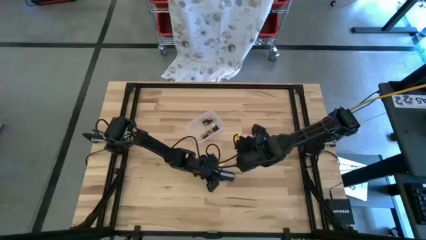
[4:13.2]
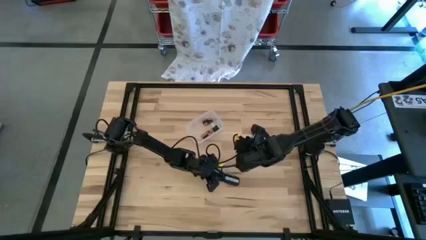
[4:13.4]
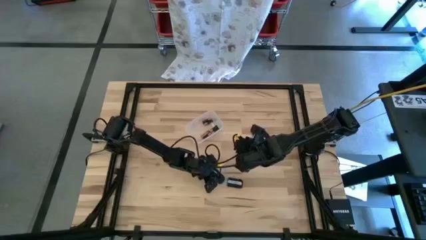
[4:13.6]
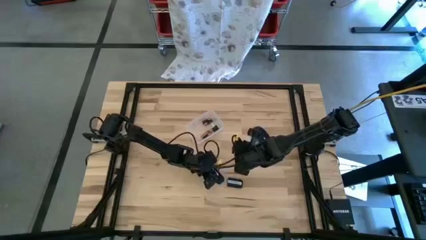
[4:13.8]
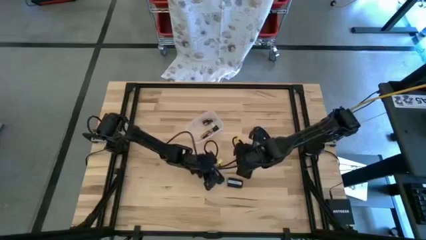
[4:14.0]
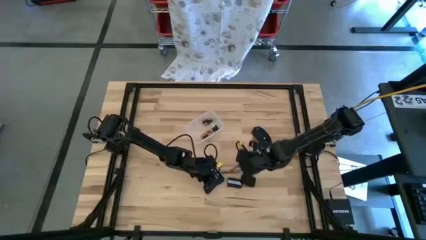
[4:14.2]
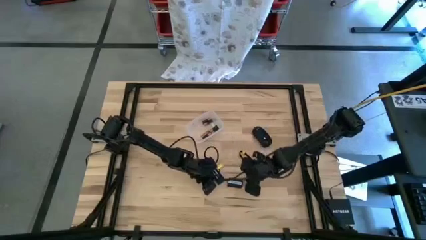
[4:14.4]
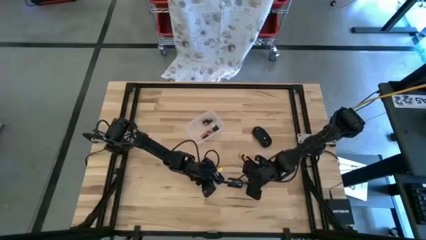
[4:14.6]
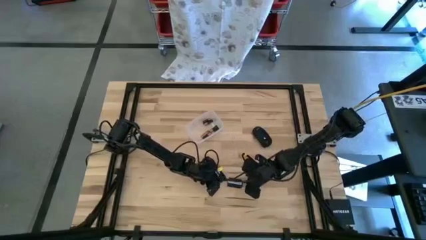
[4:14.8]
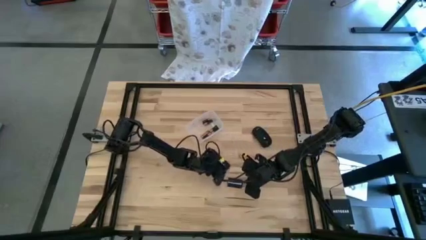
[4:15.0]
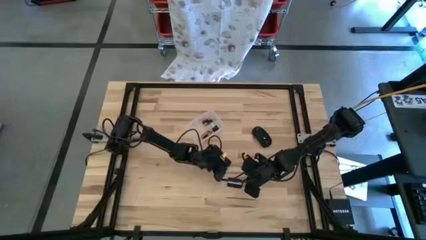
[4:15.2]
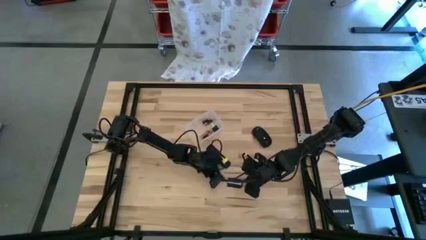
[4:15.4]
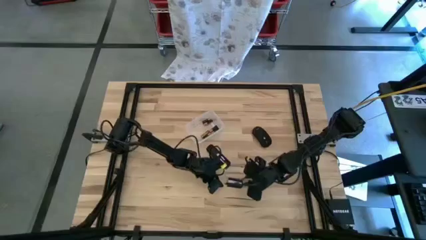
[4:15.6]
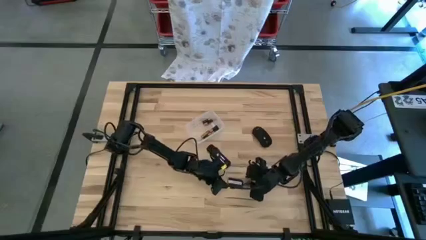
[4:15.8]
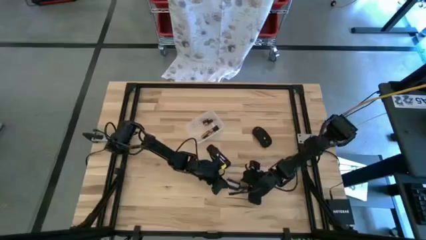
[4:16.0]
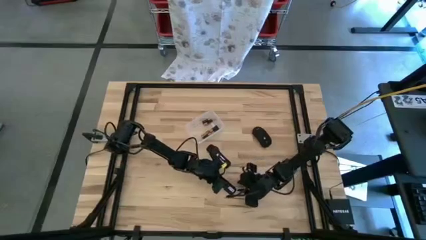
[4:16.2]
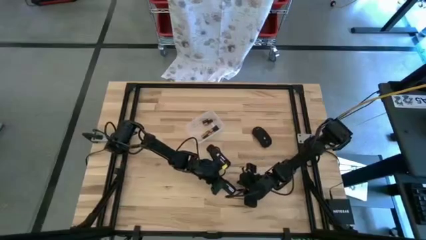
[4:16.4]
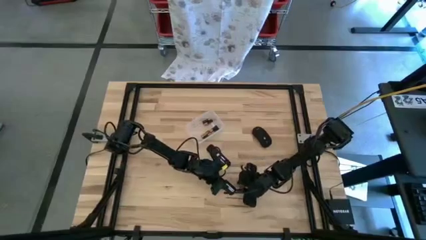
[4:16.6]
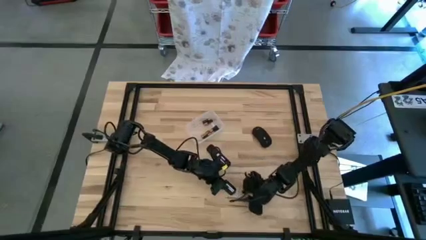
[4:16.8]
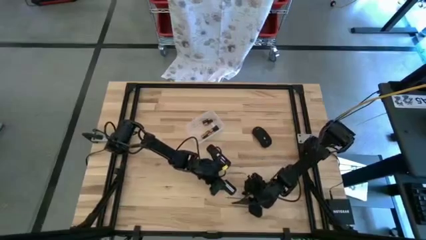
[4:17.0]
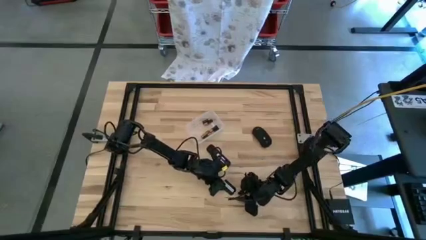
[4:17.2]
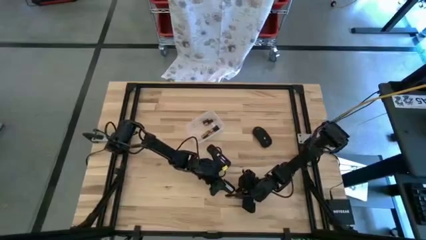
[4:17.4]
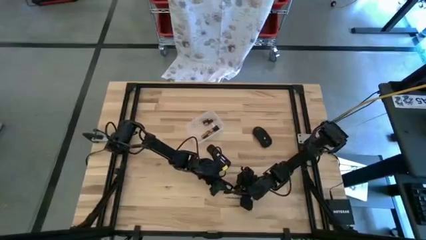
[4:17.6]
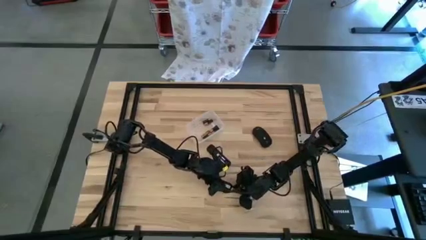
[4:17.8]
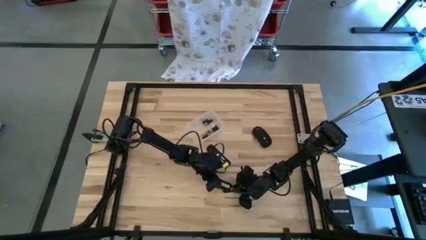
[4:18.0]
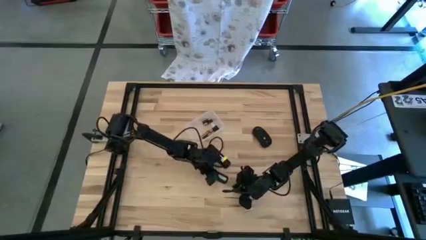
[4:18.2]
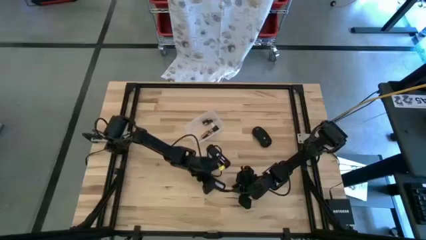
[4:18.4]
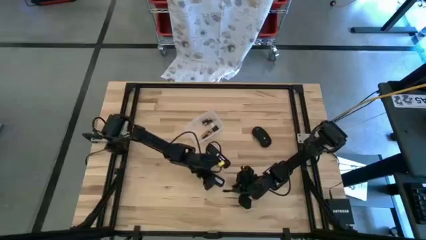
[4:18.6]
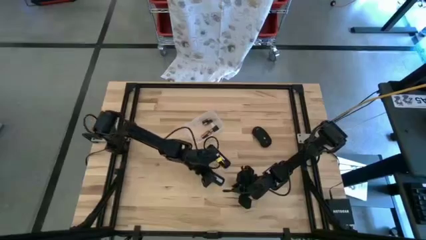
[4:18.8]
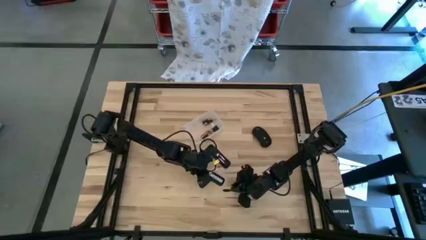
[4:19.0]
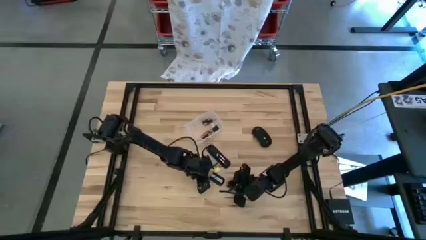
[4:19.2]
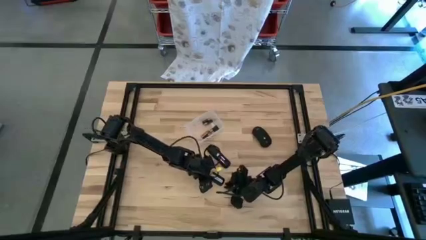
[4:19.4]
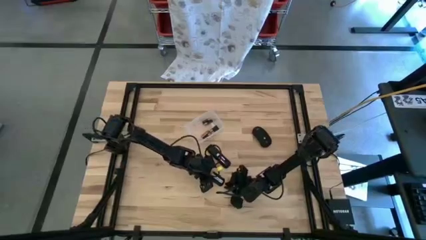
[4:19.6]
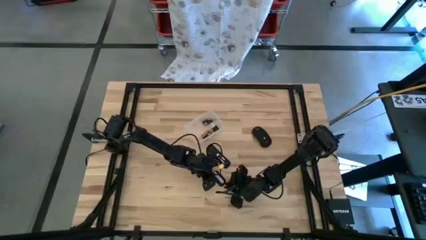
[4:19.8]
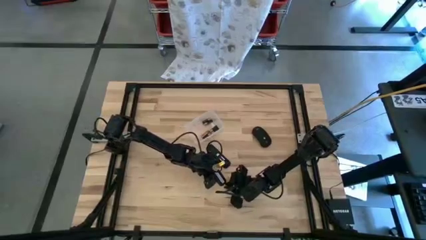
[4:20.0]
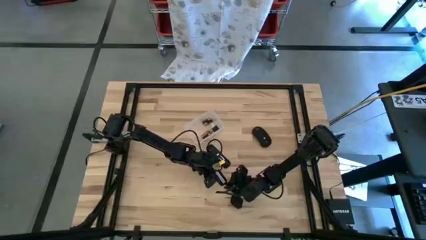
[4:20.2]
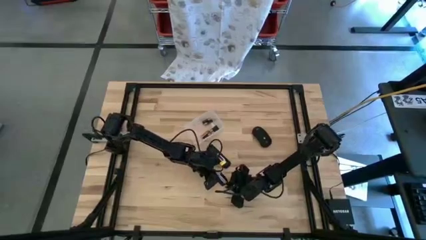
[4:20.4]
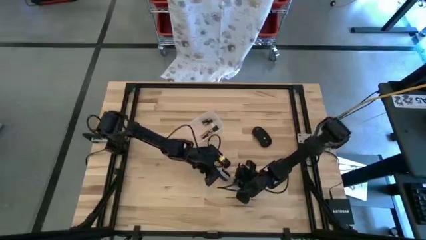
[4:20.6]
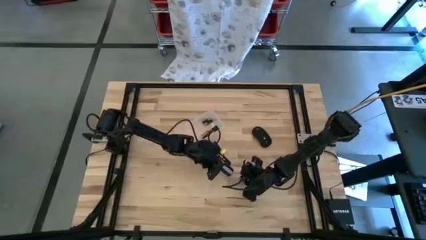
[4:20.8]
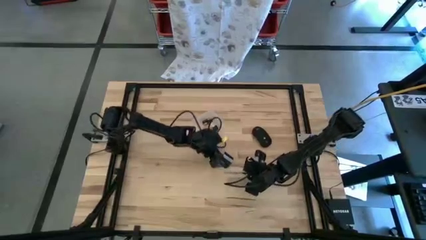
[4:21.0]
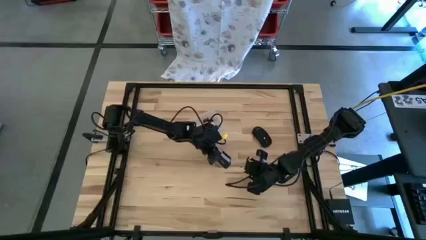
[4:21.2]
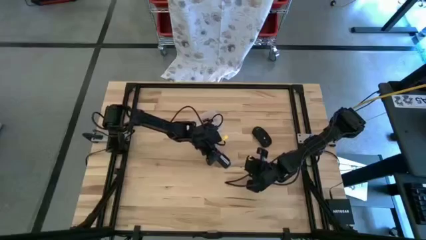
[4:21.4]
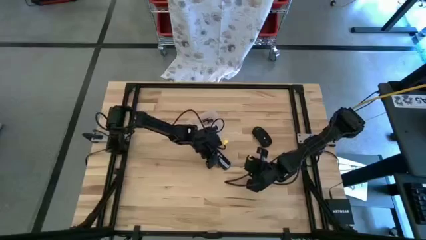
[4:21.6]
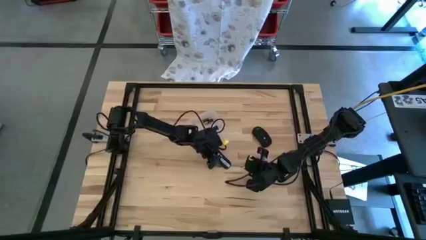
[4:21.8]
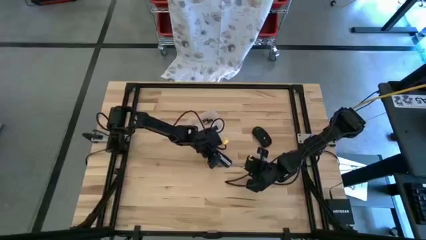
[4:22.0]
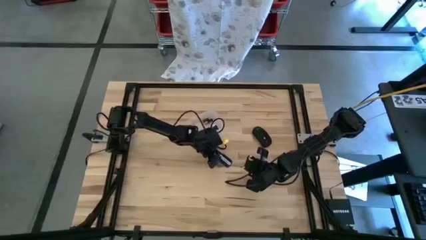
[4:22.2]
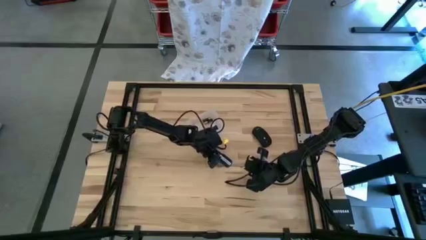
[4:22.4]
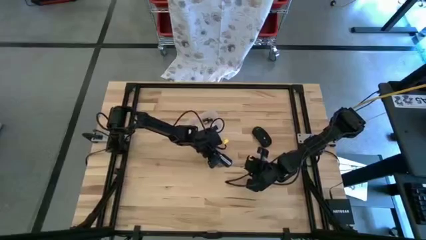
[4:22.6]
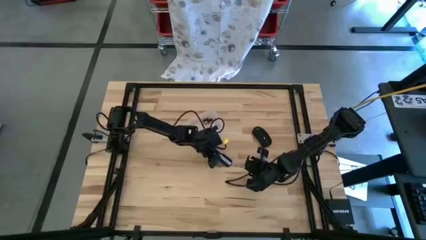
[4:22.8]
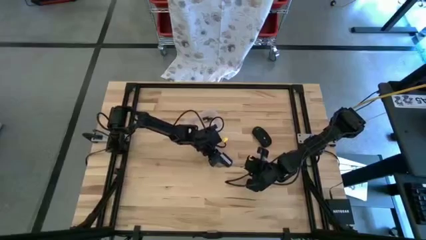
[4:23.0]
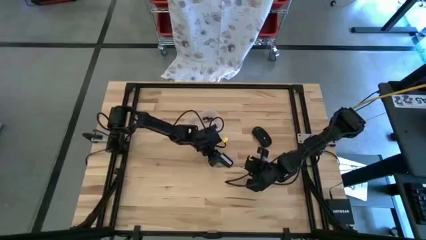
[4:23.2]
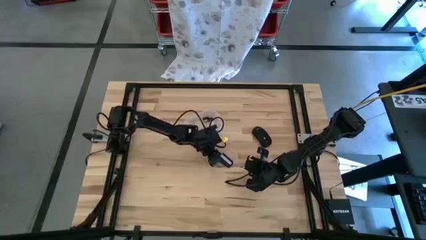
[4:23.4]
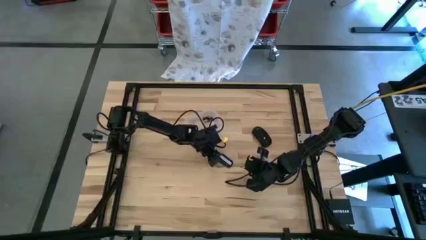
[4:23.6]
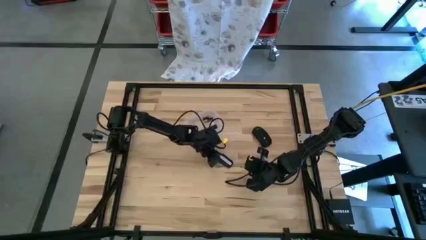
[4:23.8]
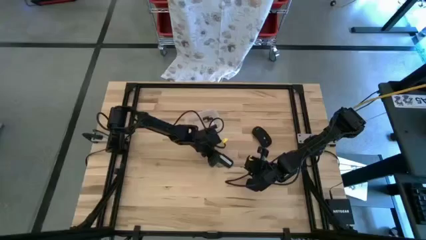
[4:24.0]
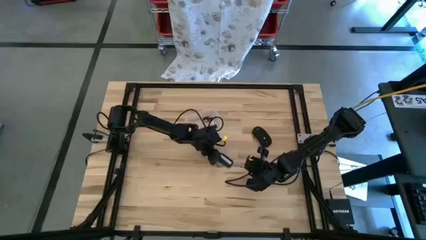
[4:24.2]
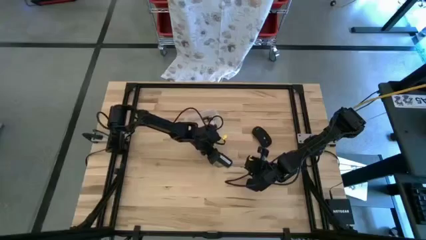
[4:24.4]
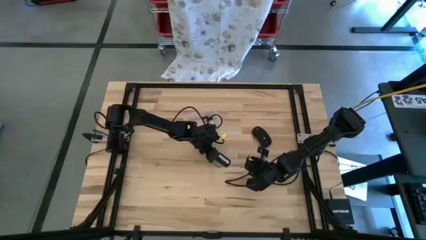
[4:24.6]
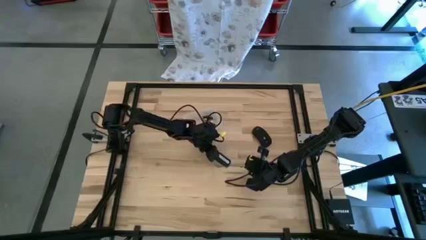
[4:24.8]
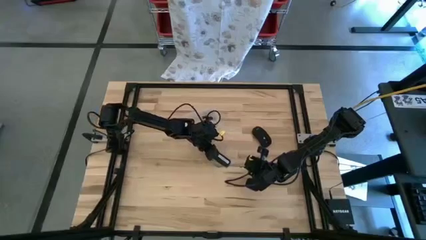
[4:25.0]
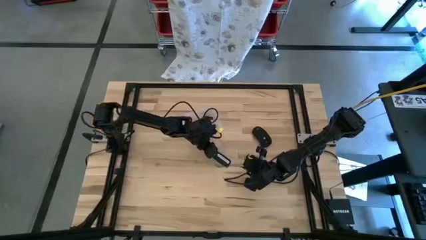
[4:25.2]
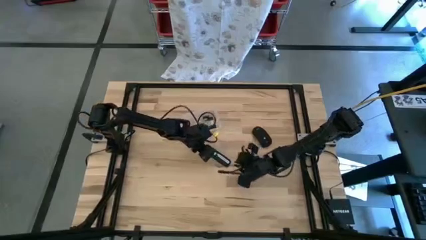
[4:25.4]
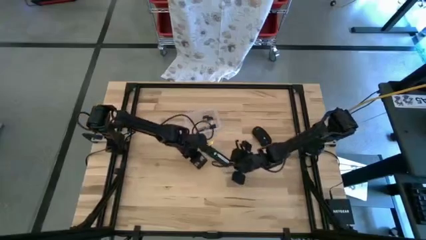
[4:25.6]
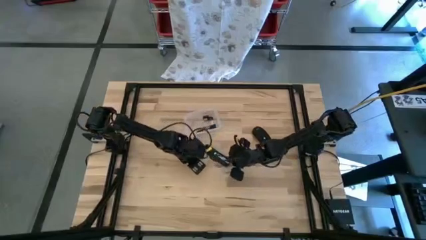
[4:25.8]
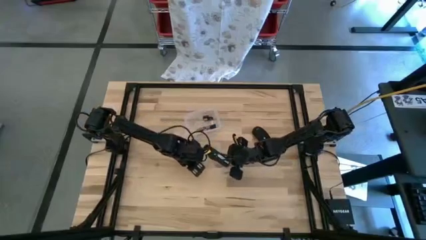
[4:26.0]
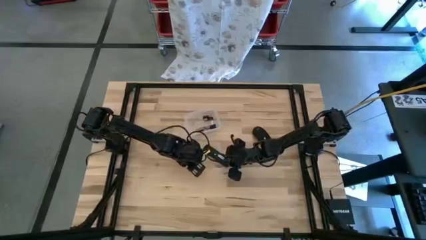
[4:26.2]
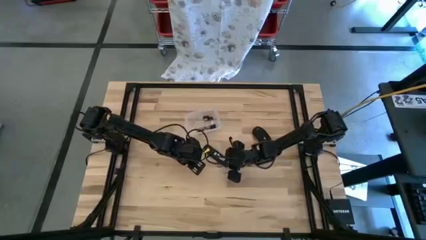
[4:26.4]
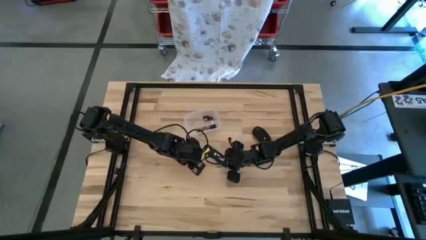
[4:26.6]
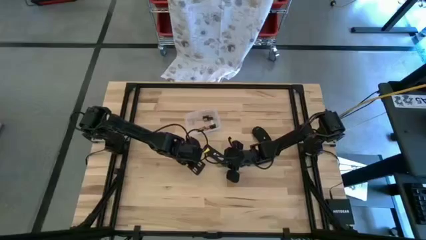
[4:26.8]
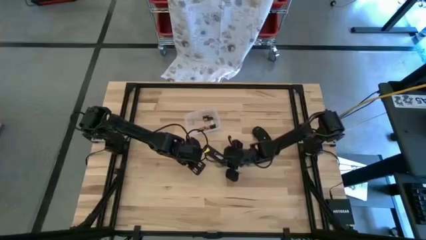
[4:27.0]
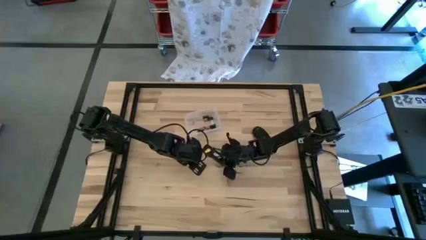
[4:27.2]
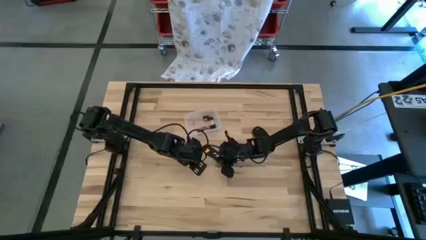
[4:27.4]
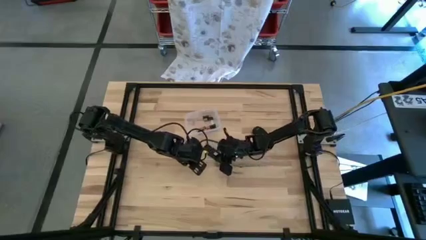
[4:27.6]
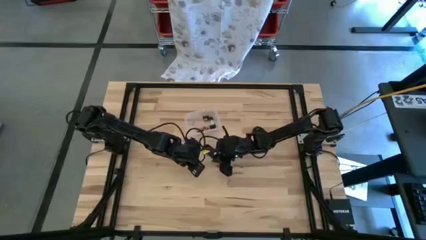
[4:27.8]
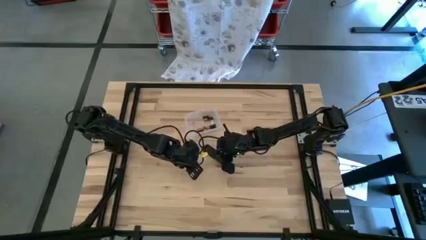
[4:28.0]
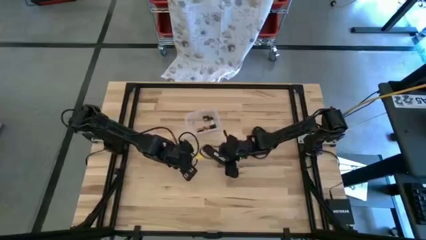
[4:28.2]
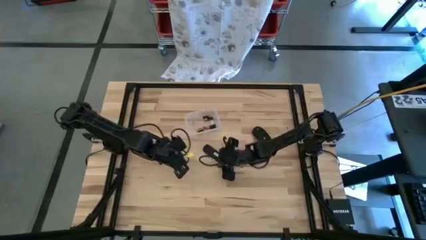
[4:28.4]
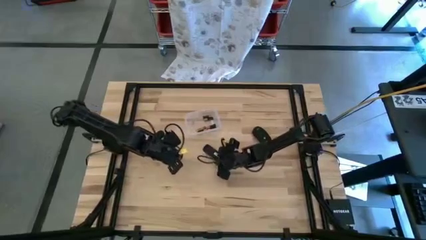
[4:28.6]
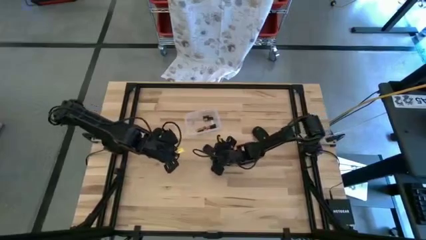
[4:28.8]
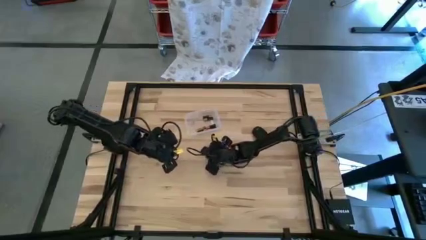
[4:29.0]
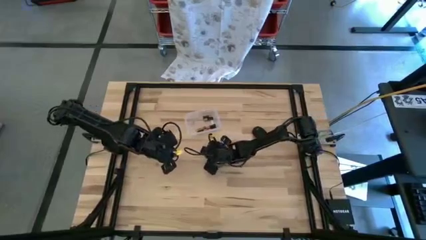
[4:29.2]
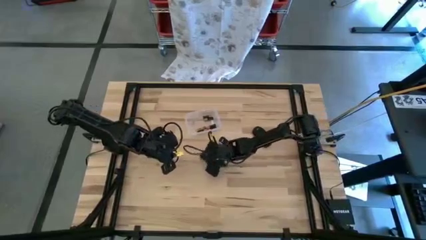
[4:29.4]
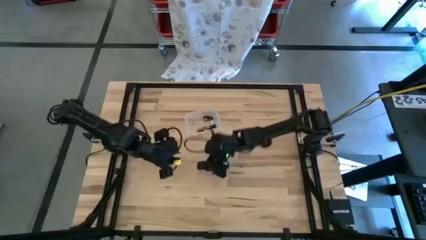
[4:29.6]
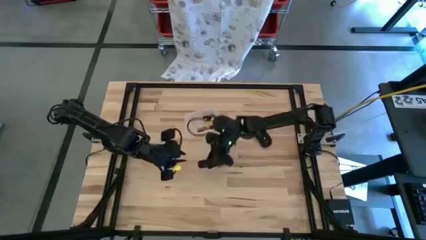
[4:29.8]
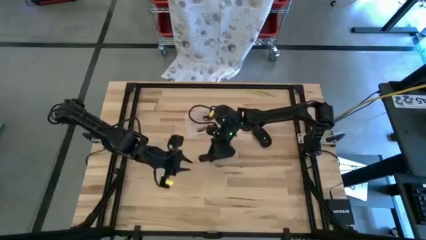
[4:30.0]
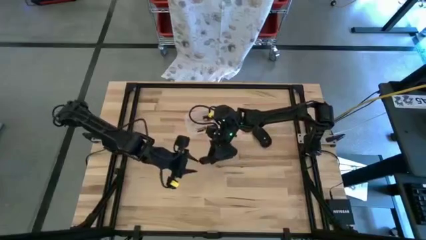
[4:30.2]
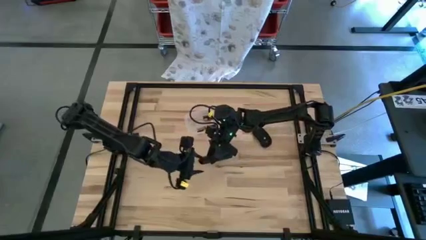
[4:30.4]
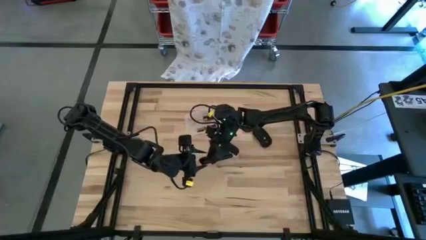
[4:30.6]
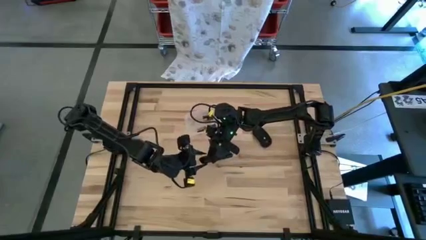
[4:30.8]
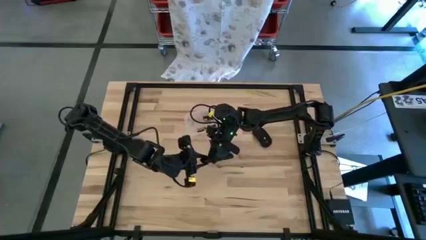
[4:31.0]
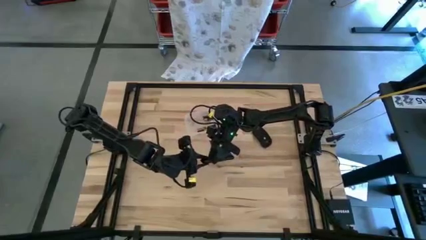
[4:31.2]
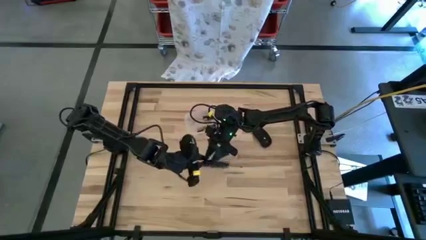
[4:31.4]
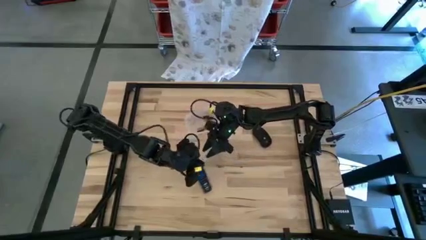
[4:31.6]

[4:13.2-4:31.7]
Task: Insert battery
Close the remote lid on the remote
